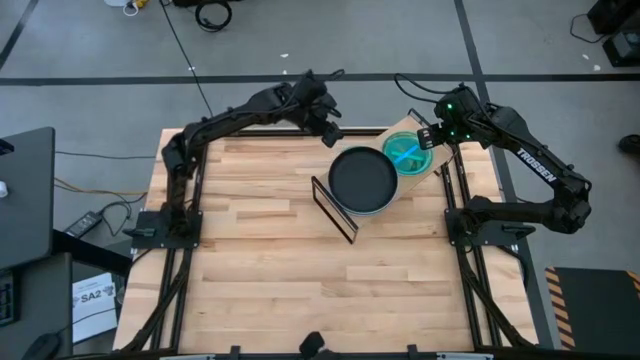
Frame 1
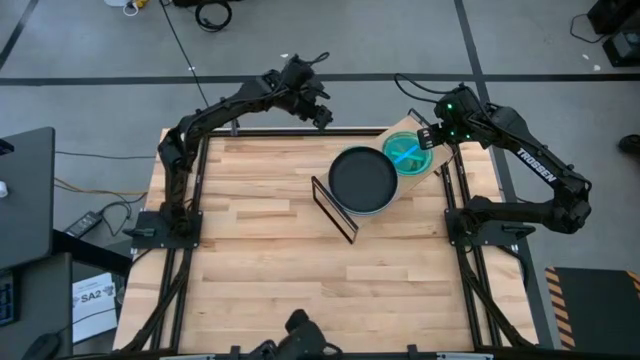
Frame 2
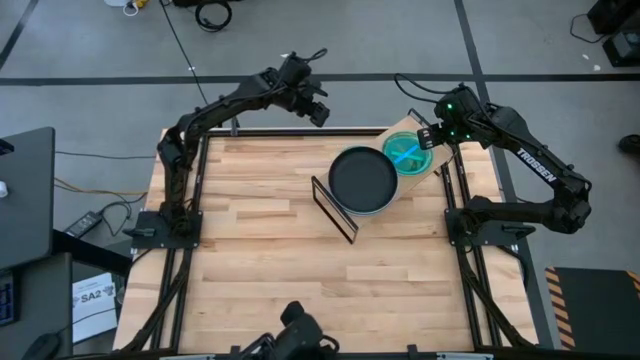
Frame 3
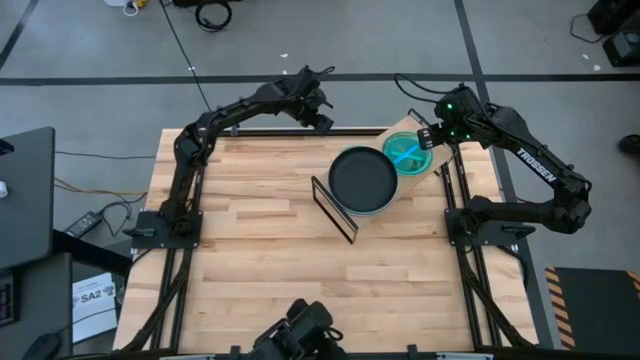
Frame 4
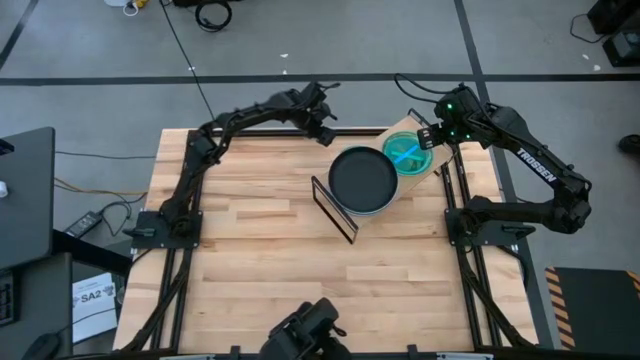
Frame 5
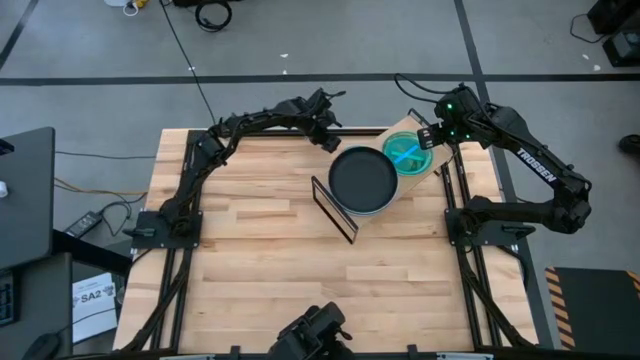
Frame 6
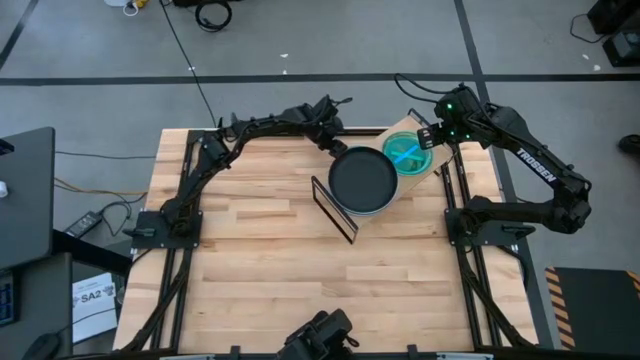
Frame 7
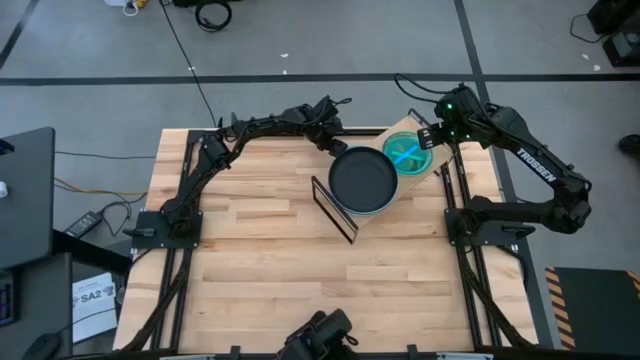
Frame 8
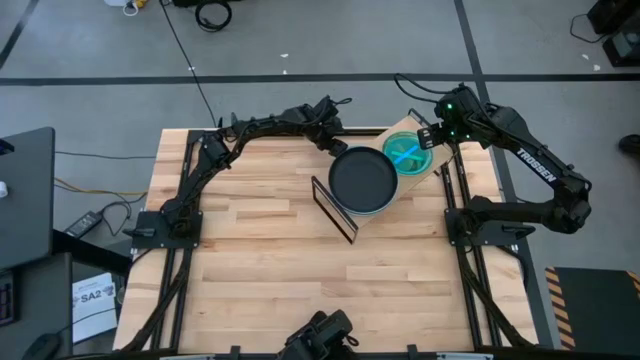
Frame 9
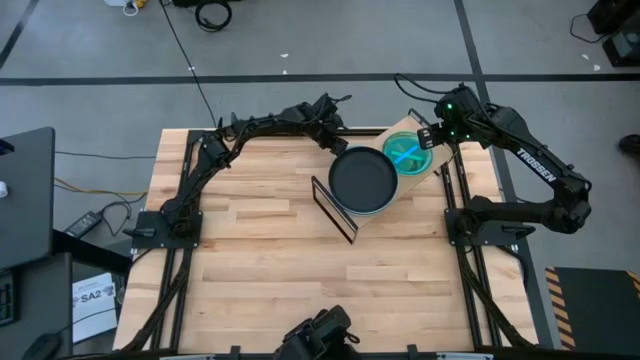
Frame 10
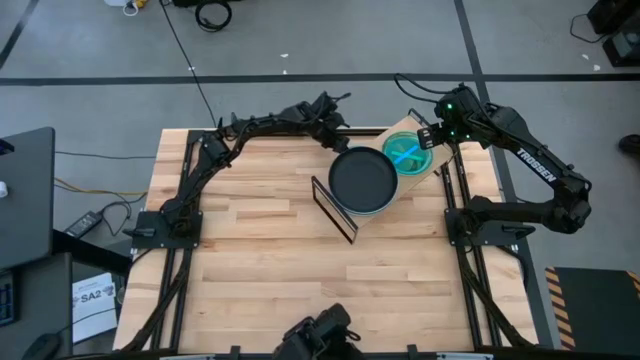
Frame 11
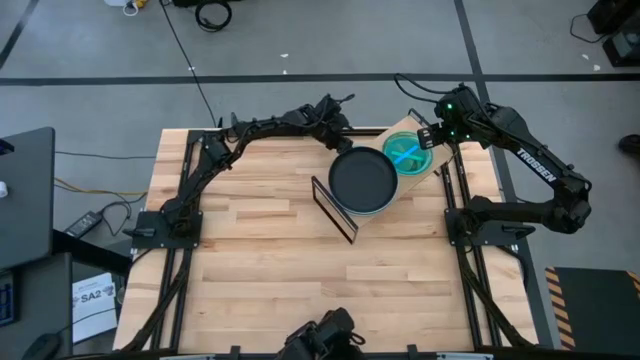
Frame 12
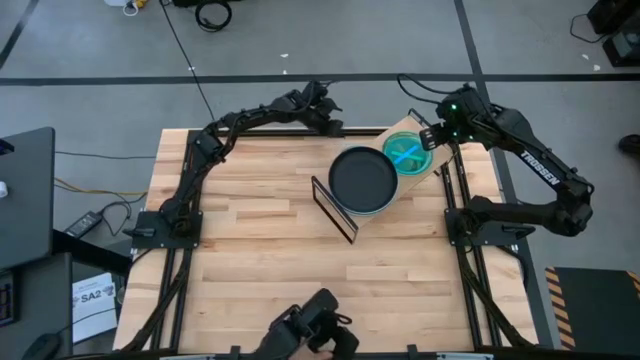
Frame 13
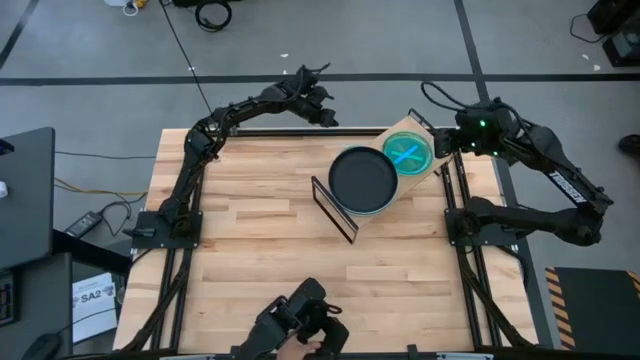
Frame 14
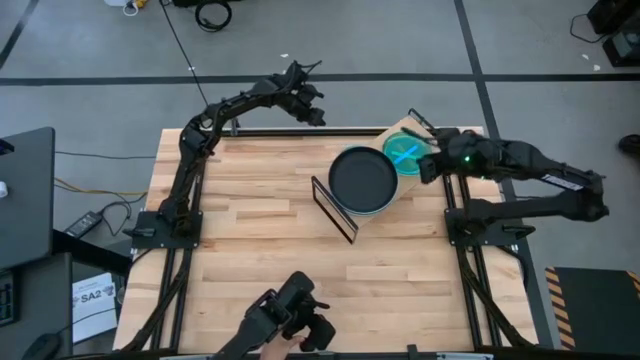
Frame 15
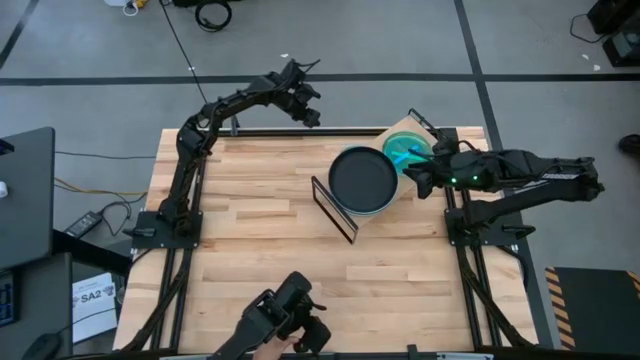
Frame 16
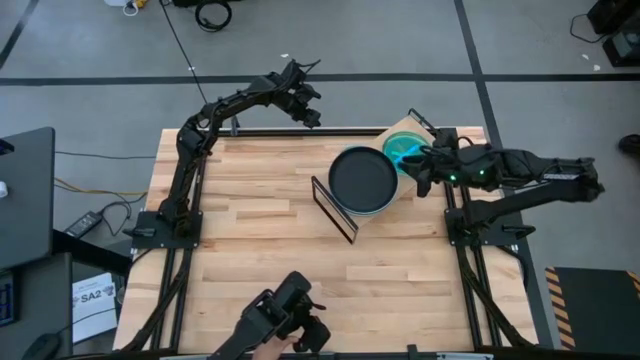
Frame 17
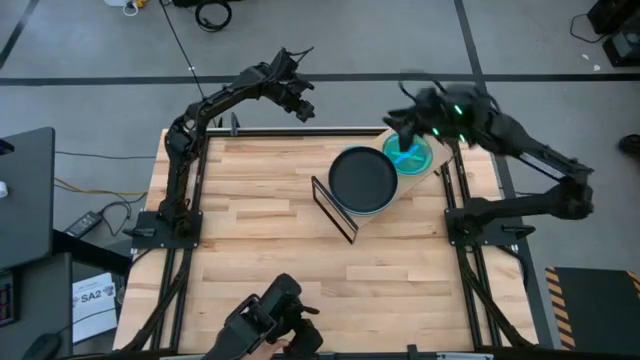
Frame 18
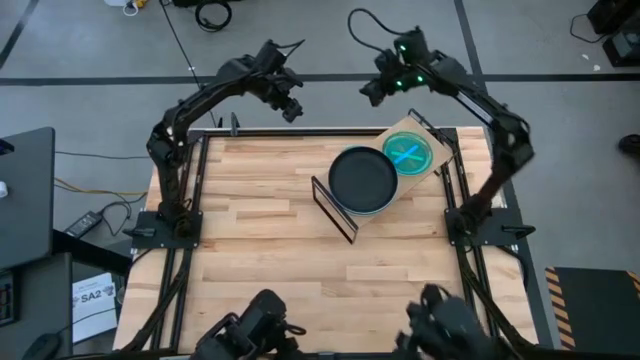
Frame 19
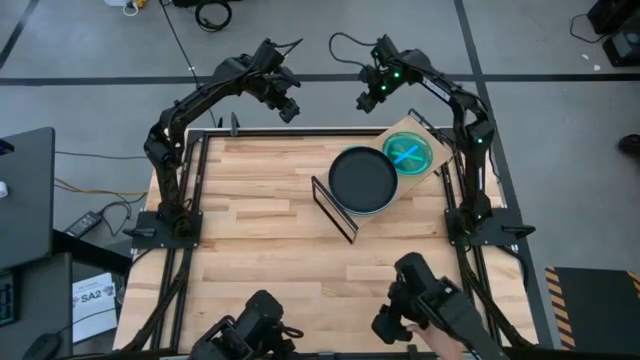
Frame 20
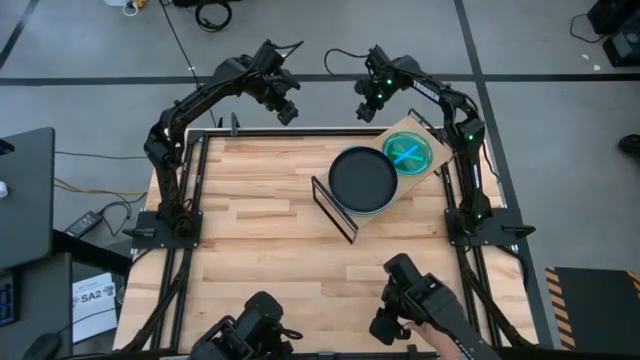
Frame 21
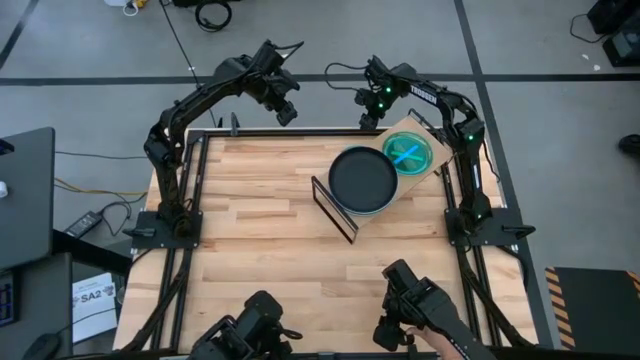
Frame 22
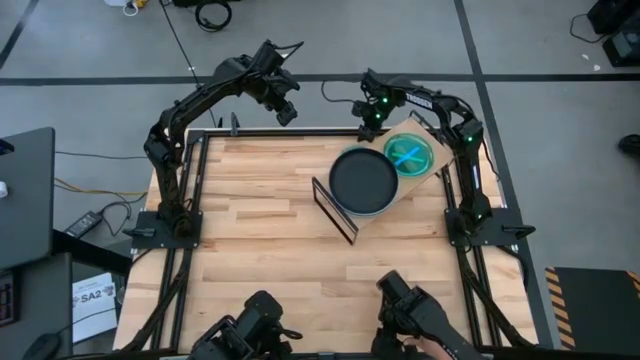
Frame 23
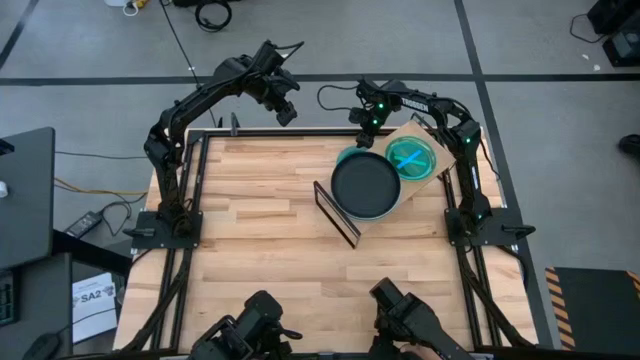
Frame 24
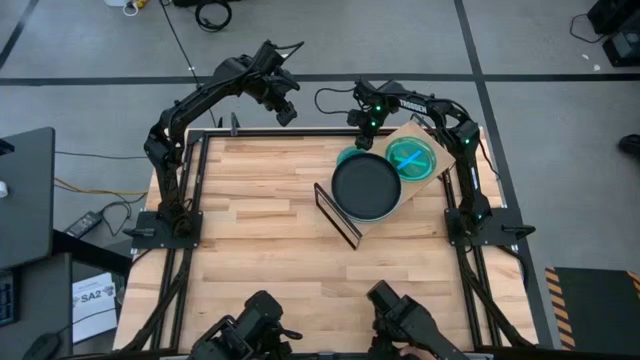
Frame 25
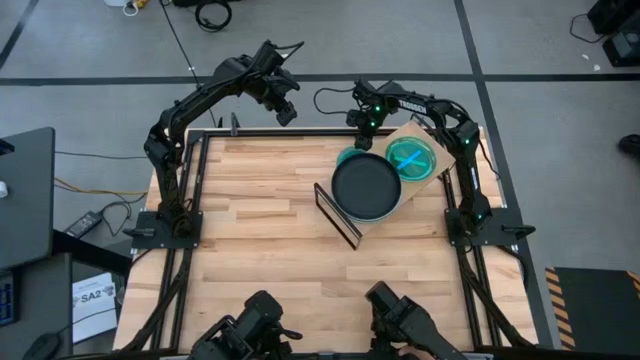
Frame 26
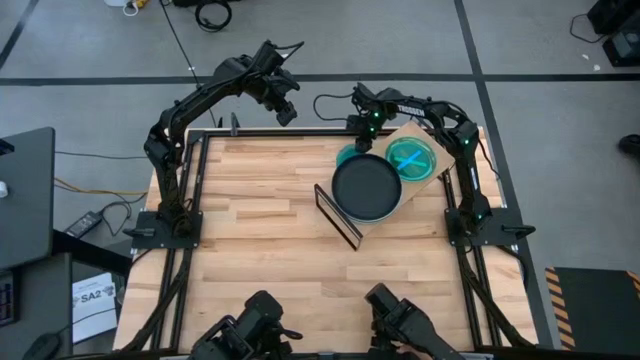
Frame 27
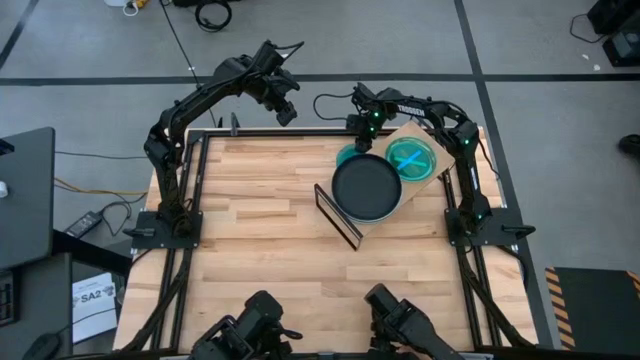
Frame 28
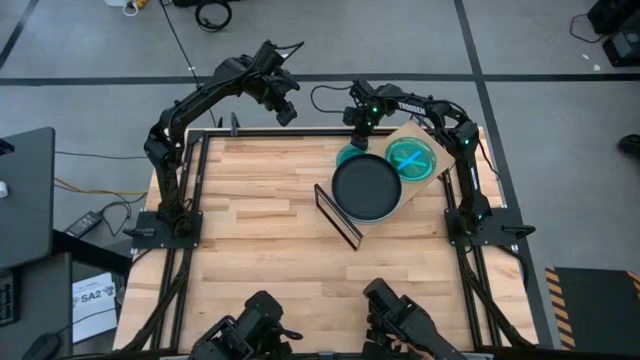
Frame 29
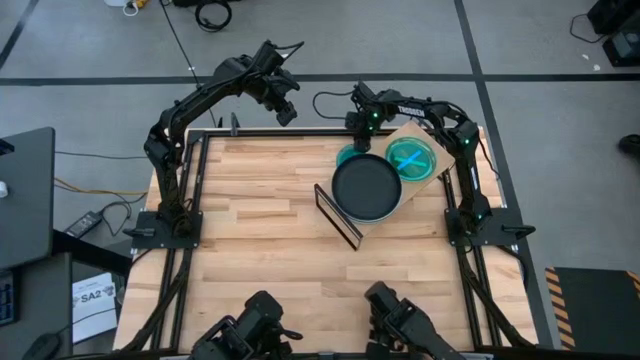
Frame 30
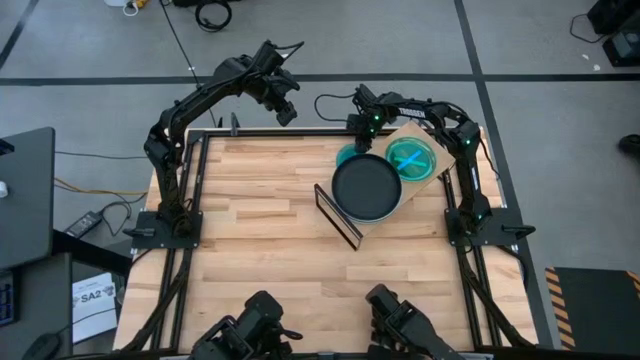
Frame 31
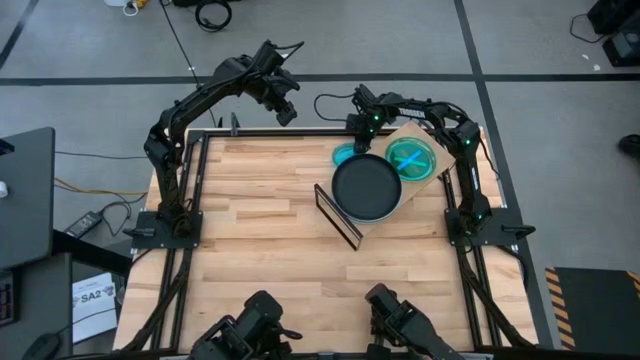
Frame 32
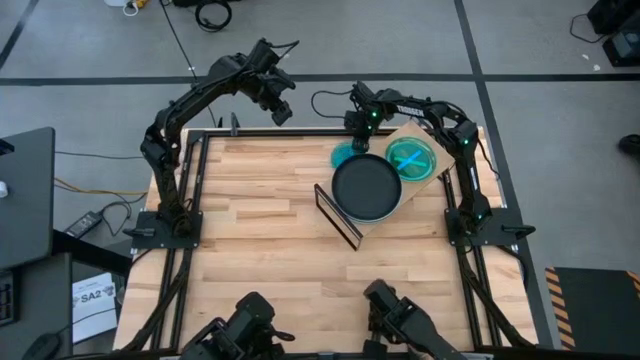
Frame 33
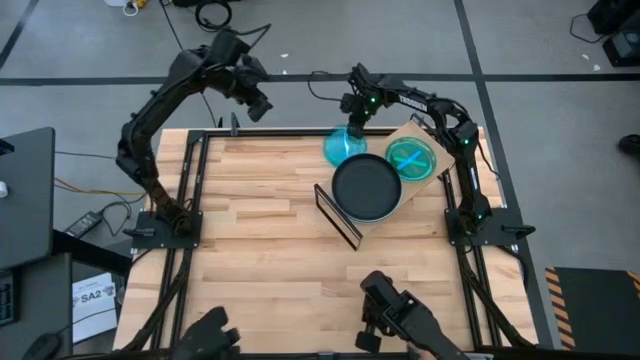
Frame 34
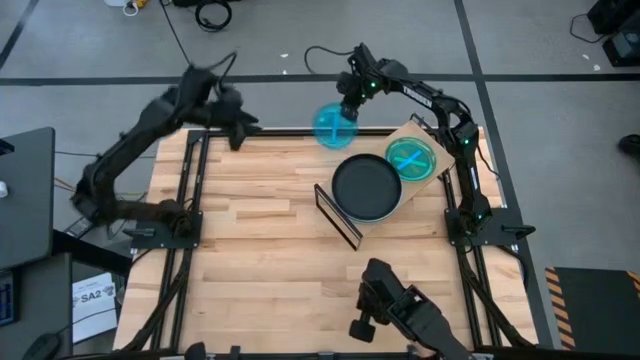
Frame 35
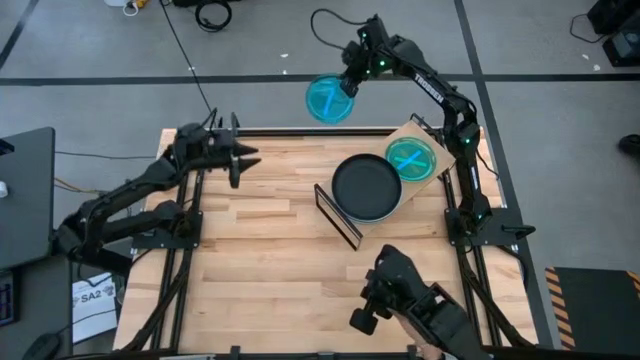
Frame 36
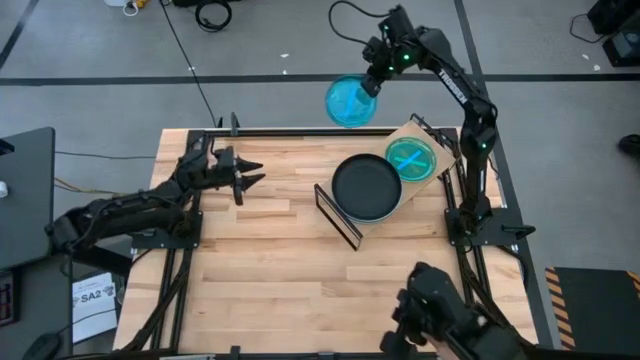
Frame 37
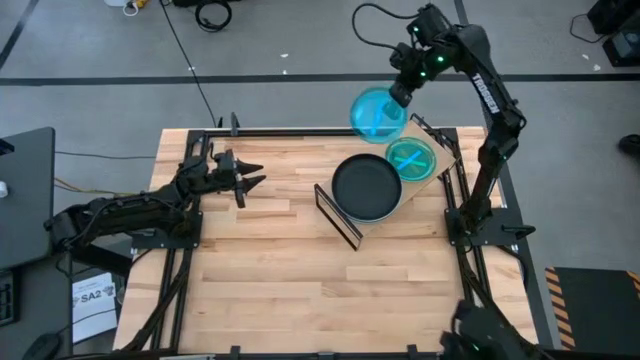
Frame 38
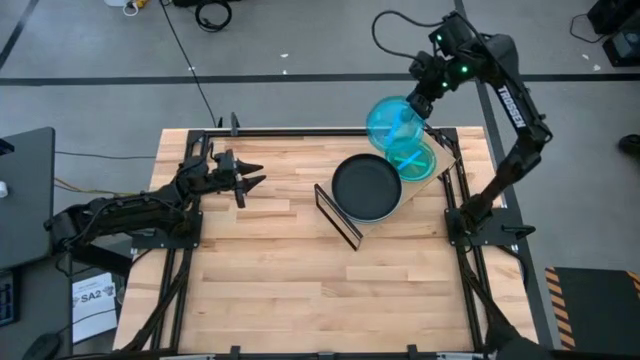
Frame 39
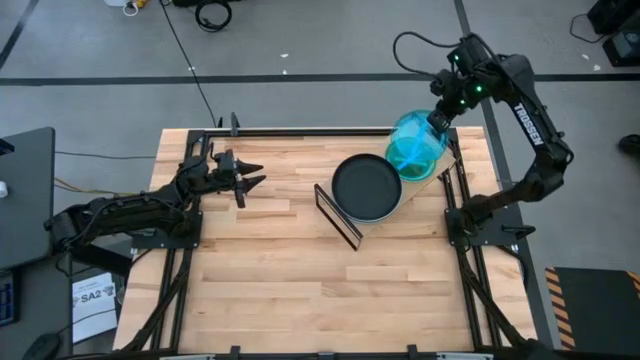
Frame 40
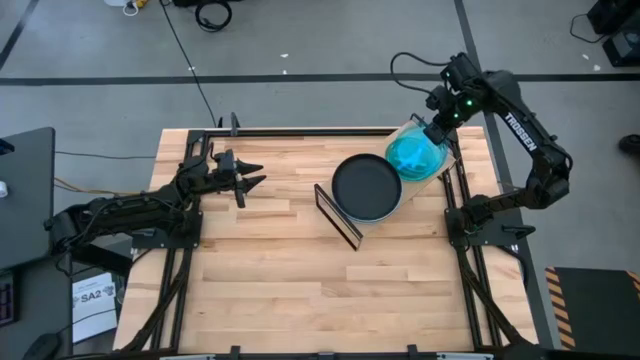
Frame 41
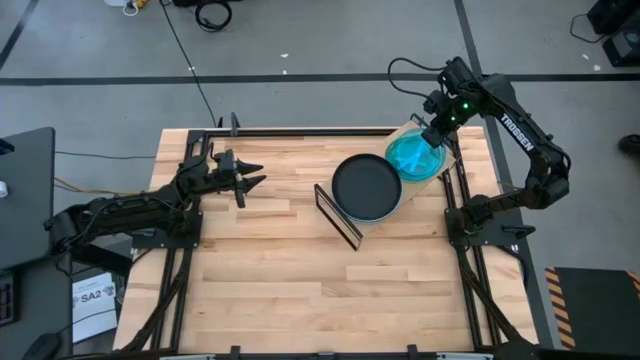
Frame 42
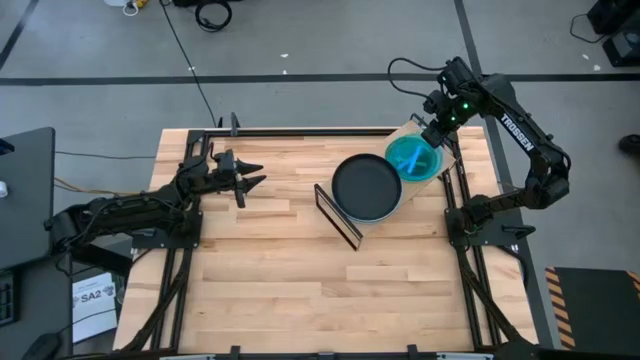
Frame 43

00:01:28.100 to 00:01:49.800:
Task: Place and stack plates onto a shelf
Stack the small blue plate on top of the small blue plate on the shelf
